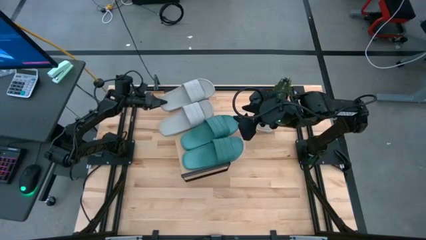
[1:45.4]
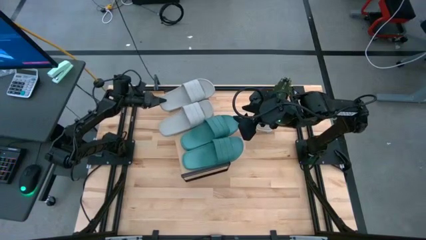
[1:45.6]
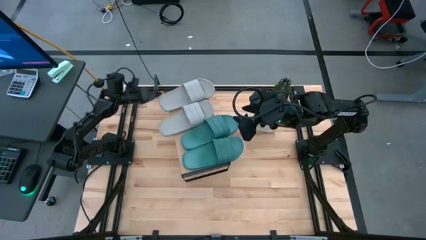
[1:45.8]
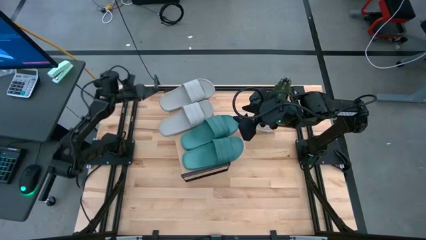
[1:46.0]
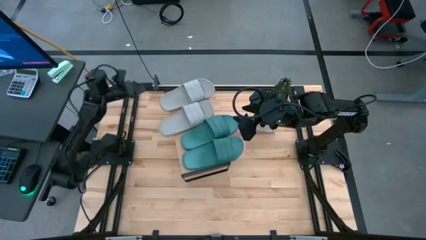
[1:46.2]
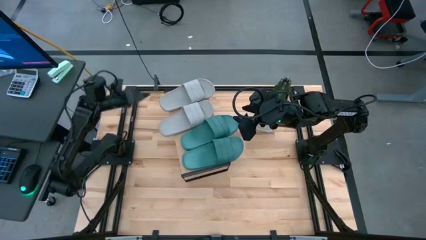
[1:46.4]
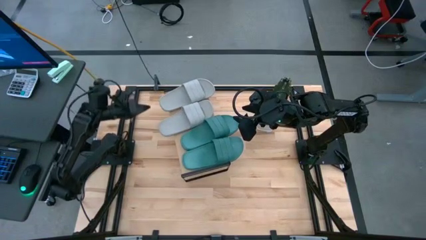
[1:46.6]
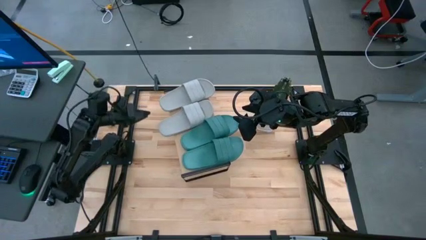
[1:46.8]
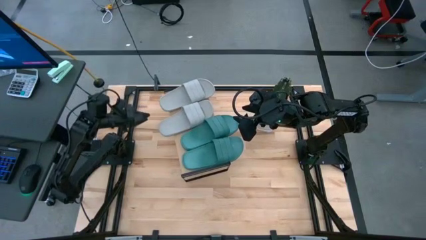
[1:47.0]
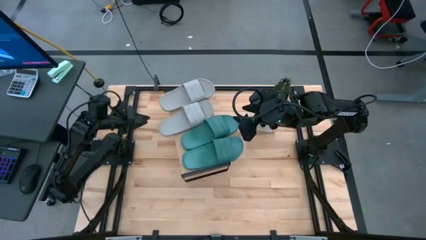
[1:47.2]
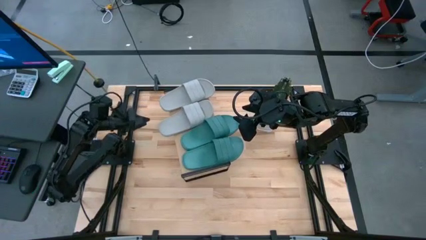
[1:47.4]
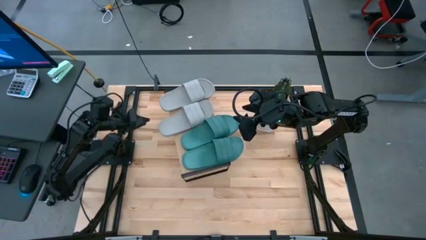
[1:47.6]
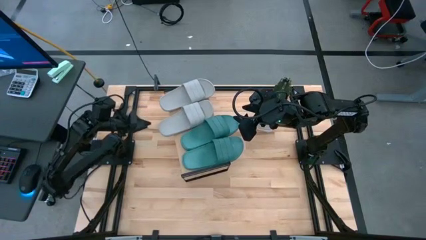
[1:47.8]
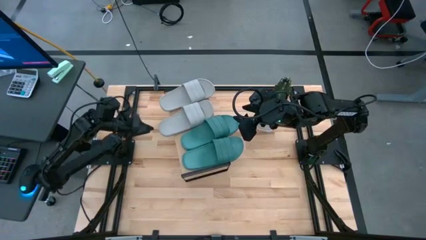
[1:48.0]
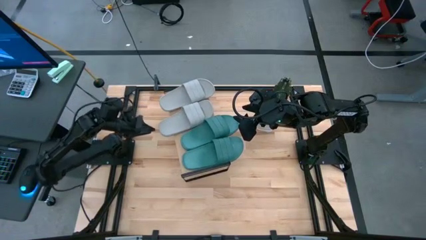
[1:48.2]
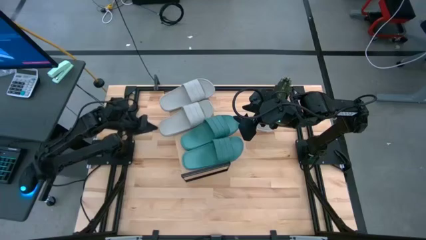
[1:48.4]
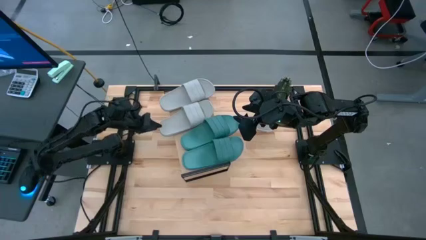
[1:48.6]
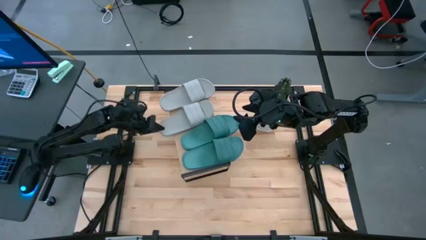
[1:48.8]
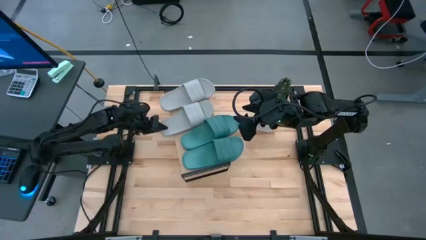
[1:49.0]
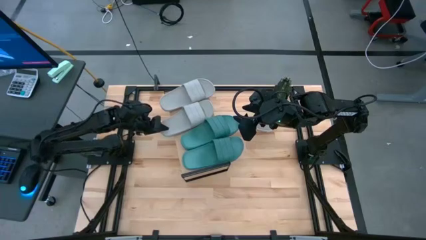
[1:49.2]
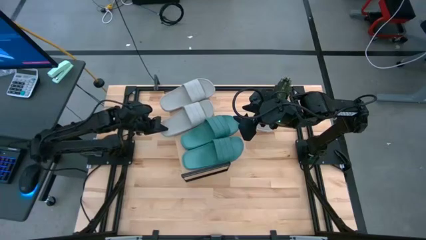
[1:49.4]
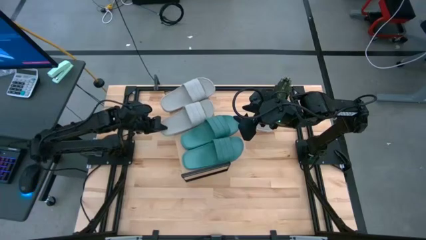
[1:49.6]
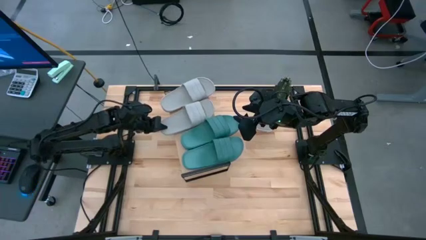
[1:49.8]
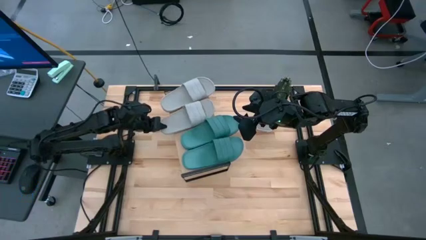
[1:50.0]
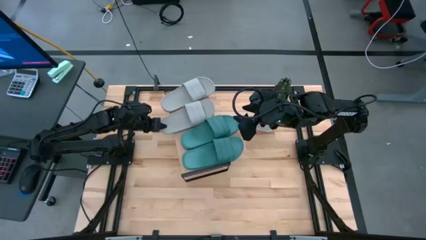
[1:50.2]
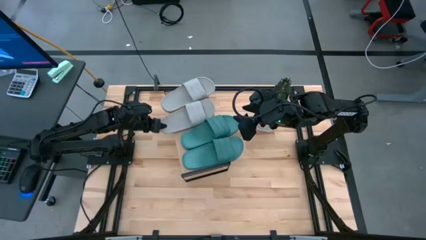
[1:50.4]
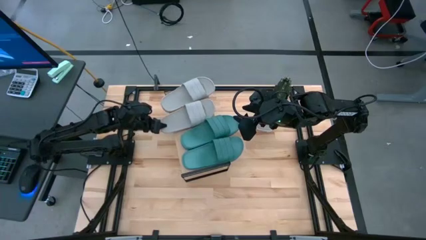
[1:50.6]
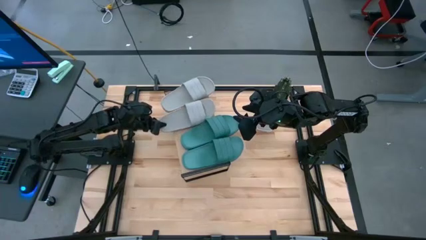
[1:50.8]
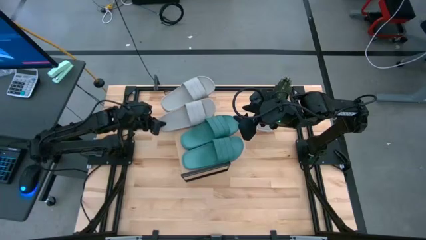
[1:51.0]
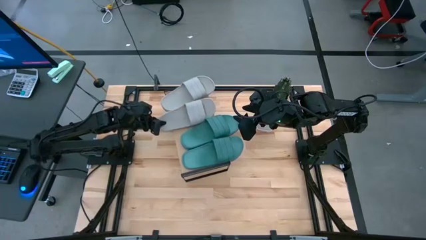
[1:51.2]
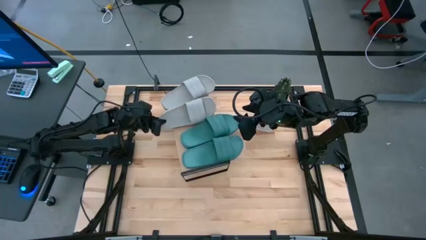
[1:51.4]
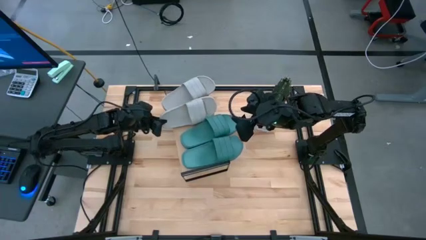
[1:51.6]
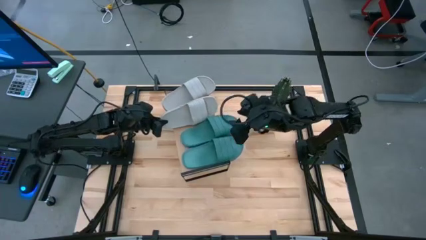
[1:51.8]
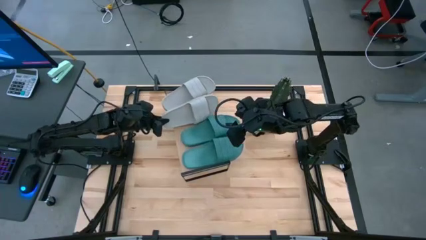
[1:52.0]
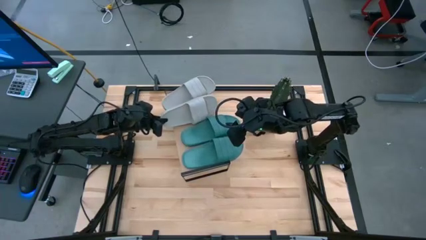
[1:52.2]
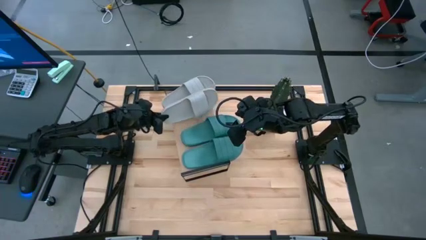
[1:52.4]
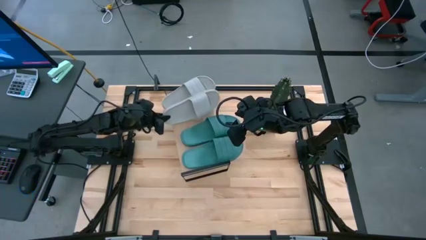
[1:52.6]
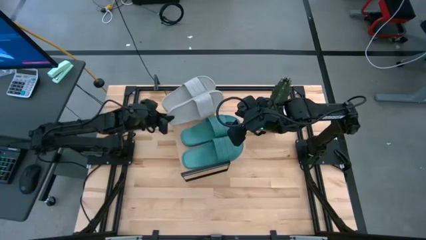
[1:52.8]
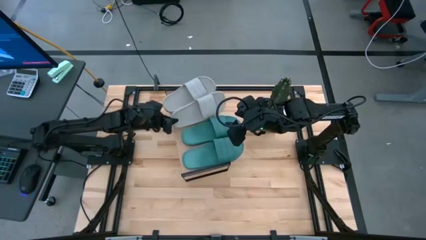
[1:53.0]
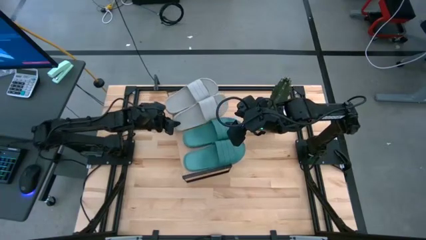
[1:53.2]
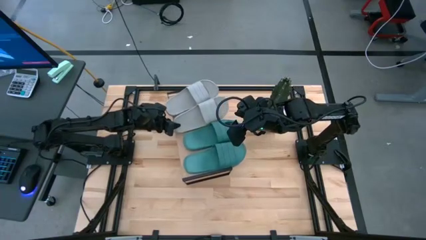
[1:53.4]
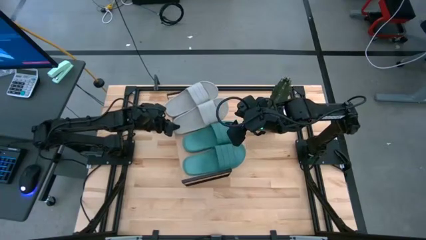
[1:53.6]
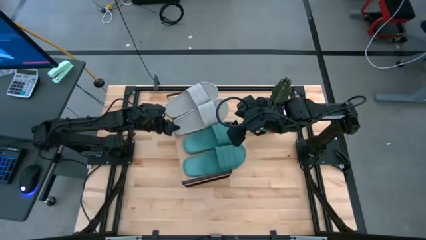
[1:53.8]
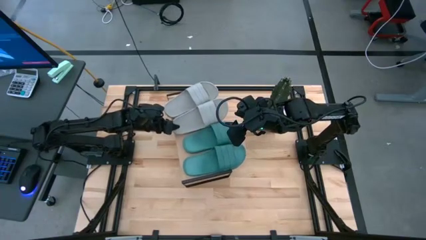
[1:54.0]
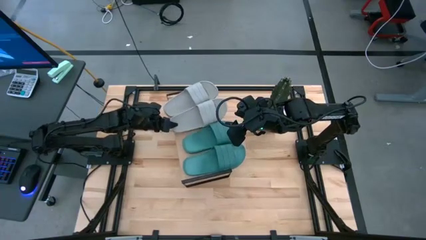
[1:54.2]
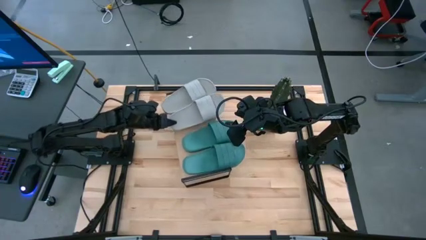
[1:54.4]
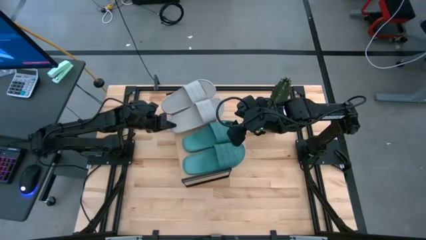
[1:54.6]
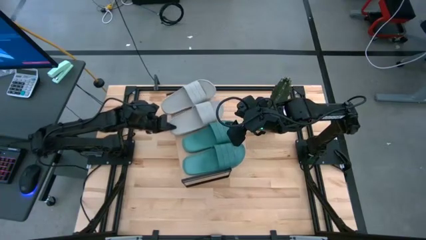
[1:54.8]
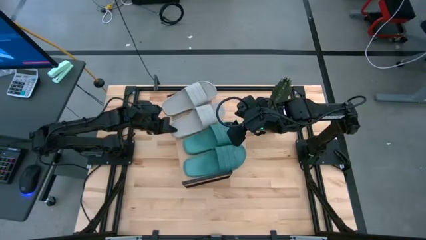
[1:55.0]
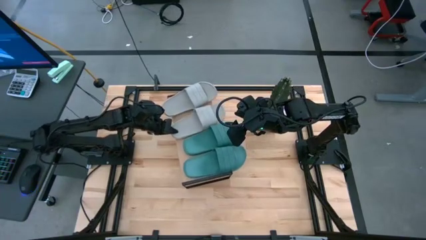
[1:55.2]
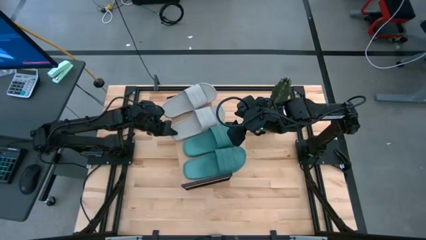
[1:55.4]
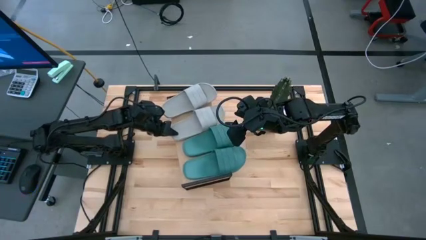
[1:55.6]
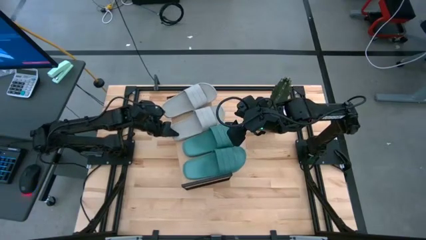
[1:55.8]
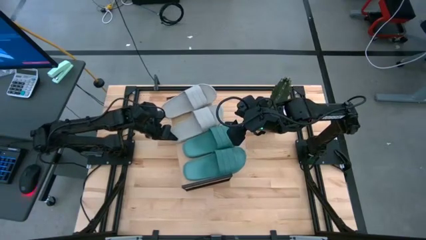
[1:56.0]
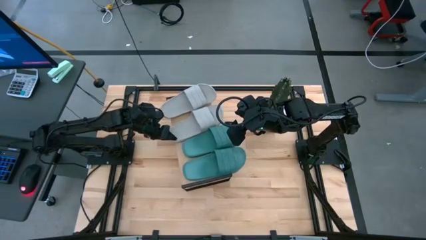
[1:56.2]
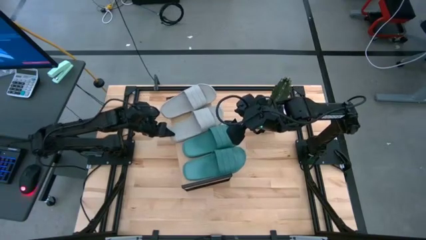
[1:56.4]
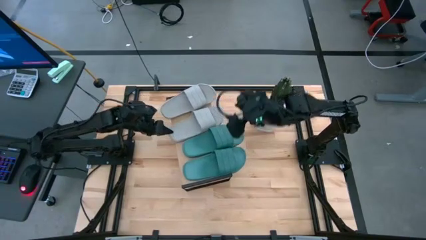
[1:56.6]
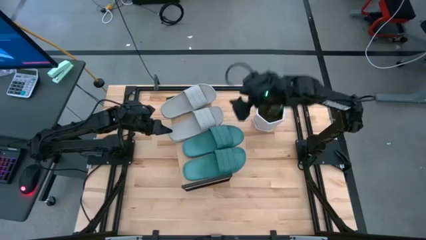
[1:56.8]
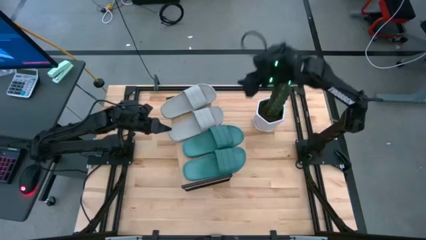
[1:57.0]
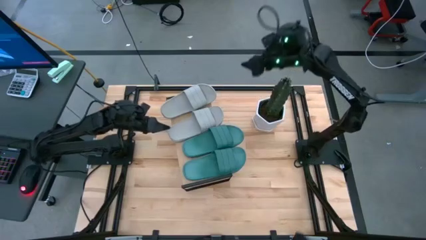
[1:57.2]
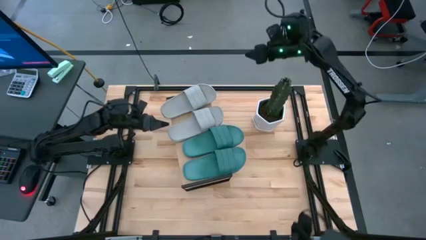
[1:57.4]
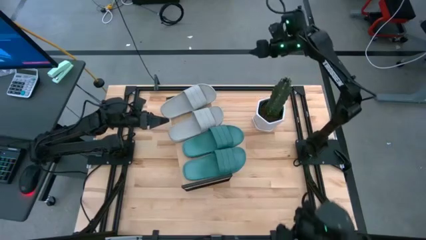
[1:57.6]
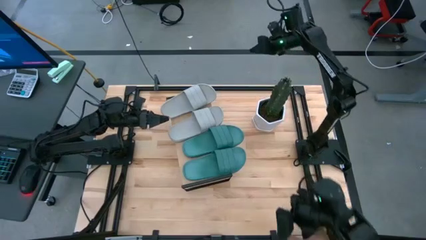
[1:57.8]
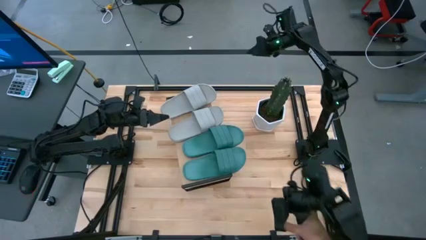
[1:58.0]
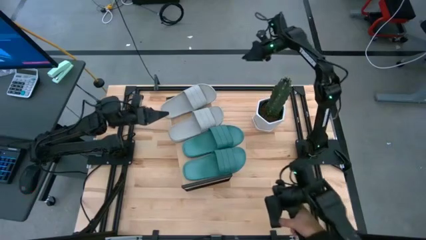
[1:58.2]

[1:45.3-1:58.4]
Task: Pick and place slides into the shelf
Adjust the white slipper

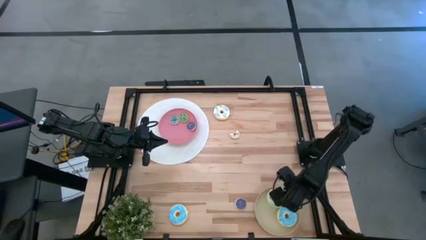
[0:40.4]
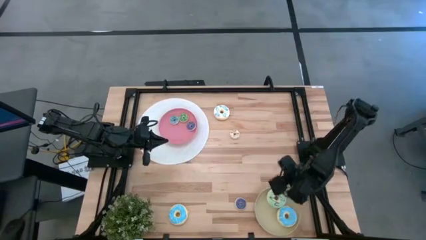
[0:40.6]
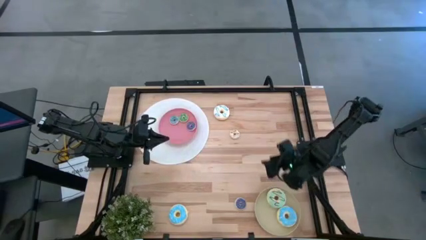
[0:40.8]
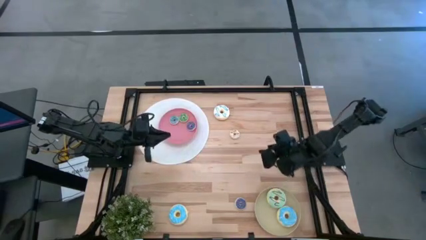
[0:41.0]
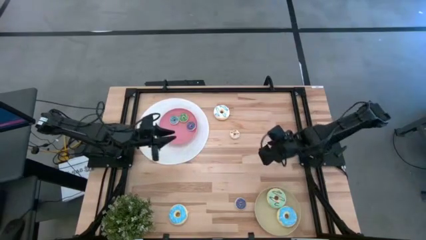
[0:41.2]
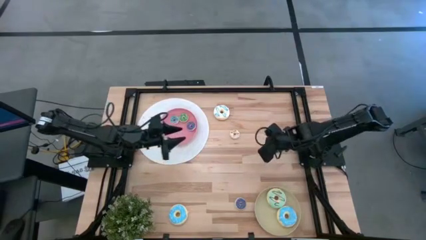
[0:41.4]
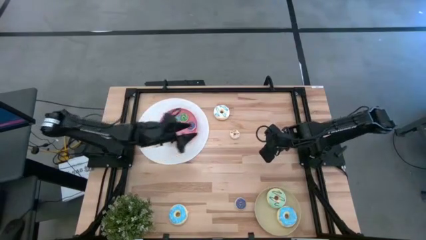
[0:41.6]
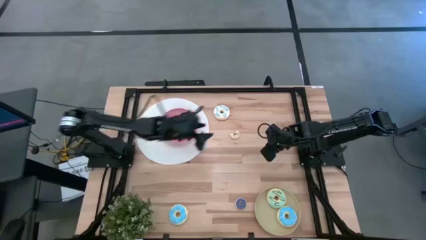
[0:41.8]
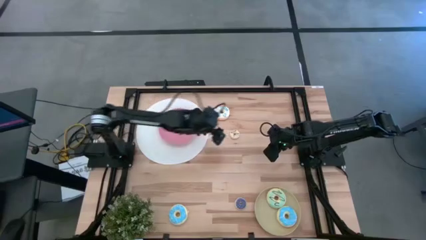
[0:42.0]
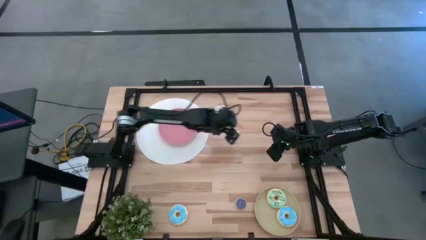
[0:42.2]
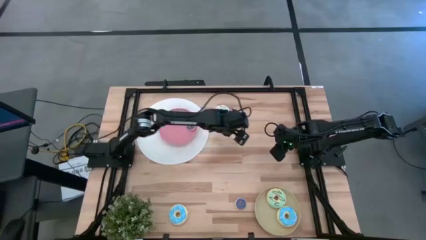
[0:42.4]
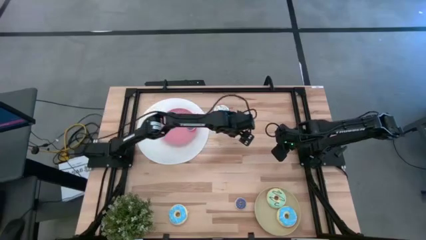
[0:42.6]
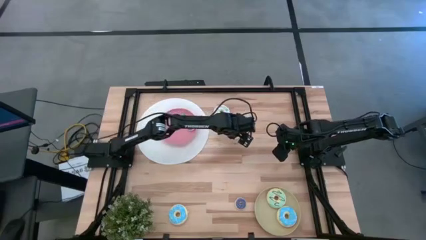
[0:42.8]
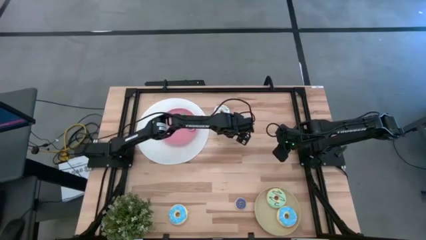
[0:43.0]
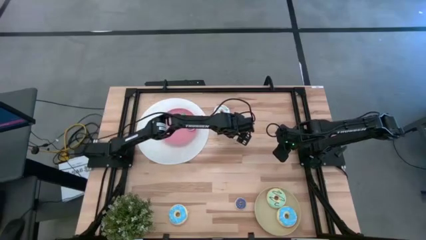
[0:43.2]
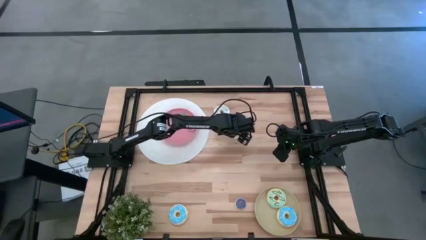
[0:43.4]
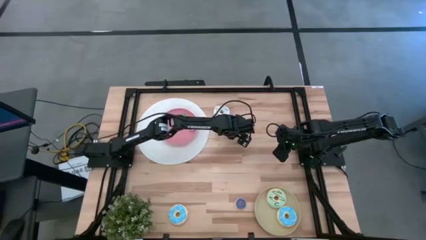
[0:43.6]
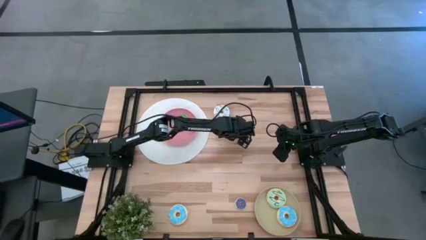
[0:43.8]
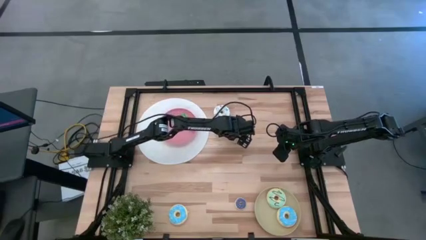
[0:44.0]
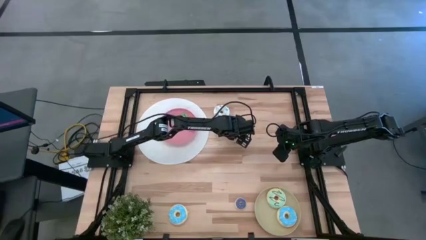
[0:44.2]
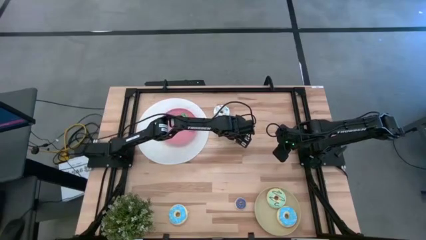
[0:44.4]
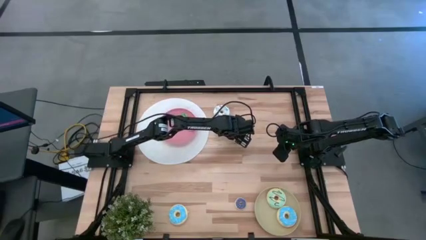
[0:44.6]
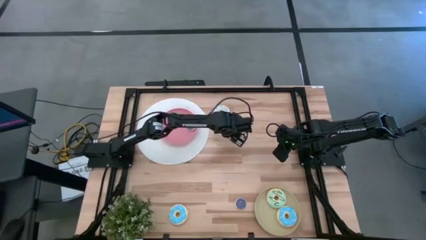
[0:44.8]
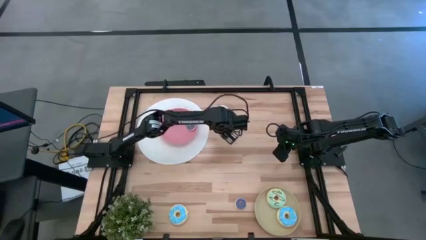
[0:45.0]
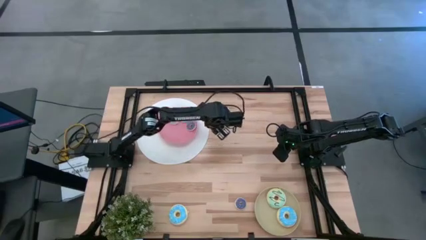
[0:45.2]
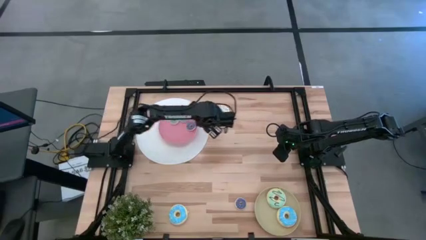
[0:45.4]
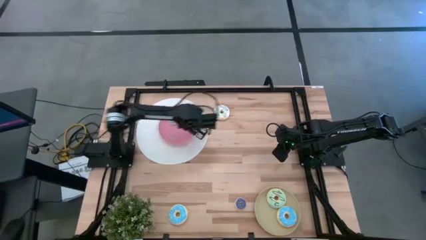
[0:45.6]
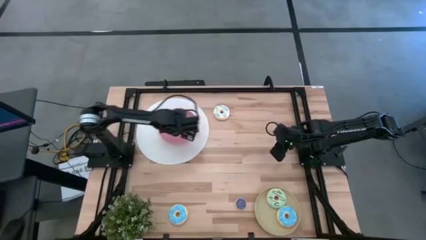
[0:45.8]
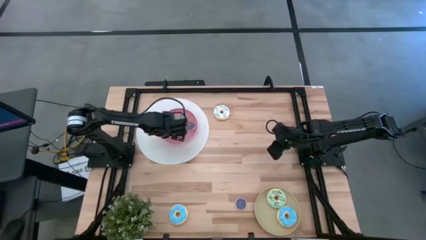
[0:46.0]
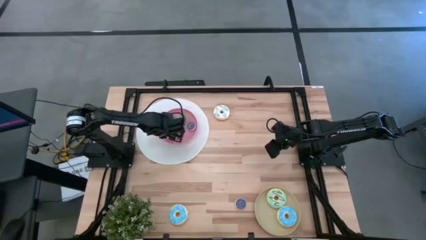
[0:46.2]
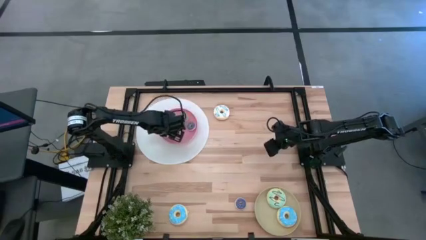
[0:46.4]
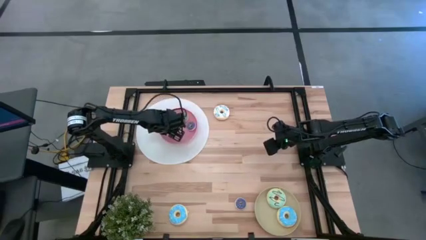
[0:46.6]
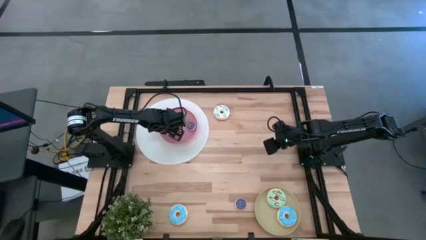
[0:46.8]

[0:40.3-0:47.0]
Task: Pick & Place donuts
Put the small white donut on the pink plate
